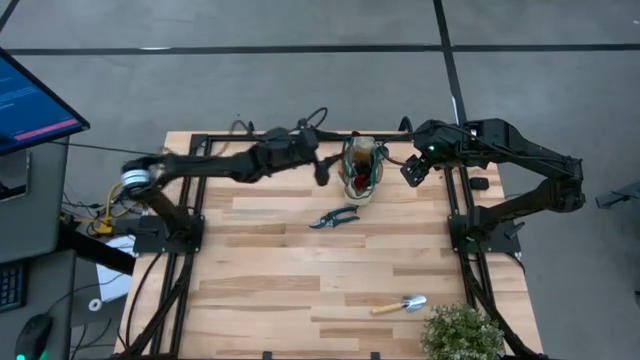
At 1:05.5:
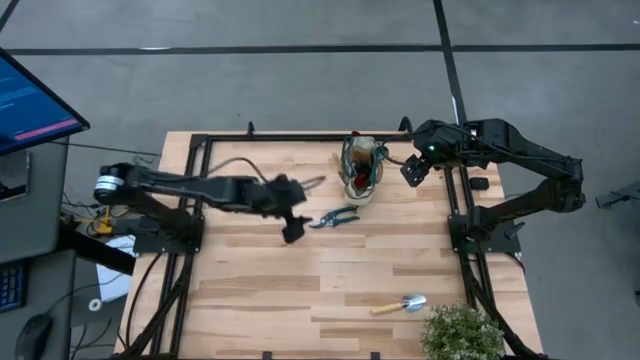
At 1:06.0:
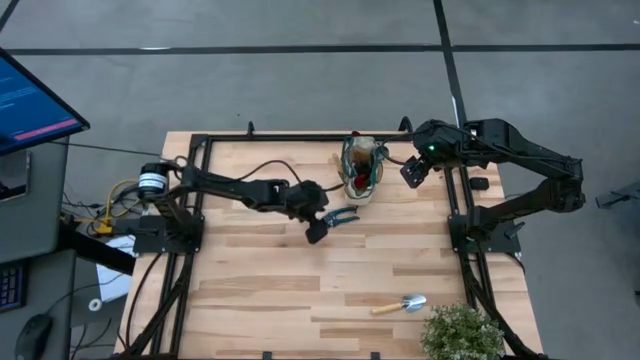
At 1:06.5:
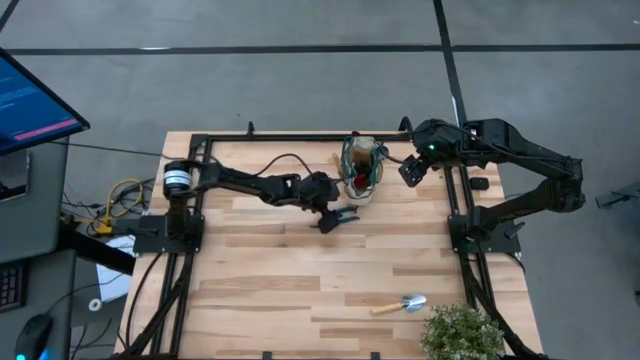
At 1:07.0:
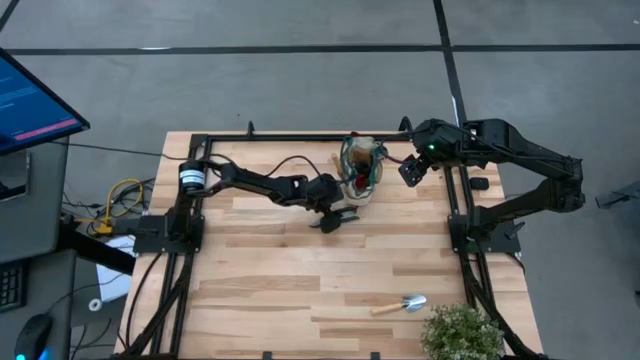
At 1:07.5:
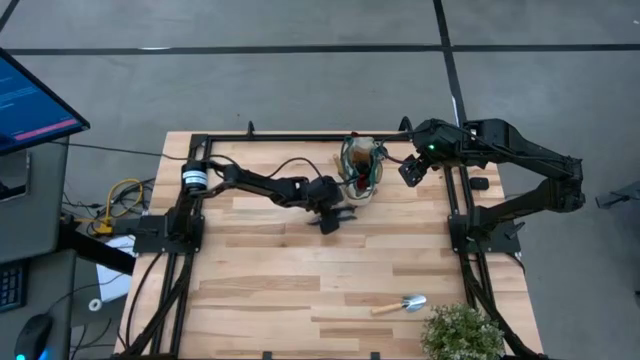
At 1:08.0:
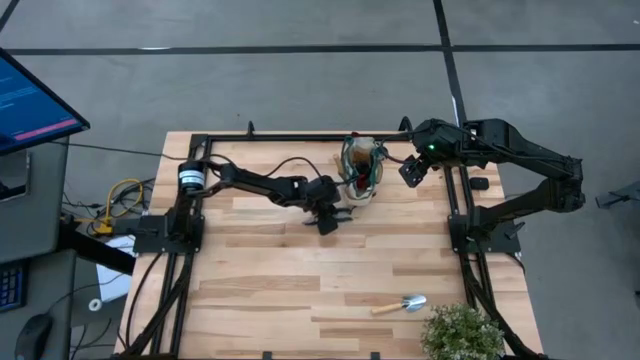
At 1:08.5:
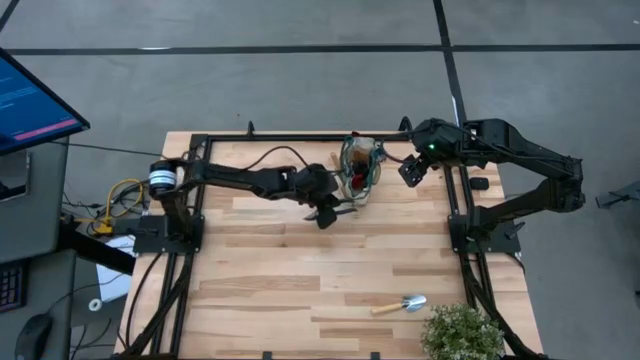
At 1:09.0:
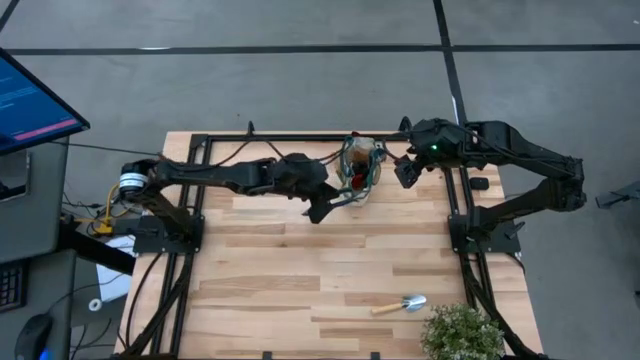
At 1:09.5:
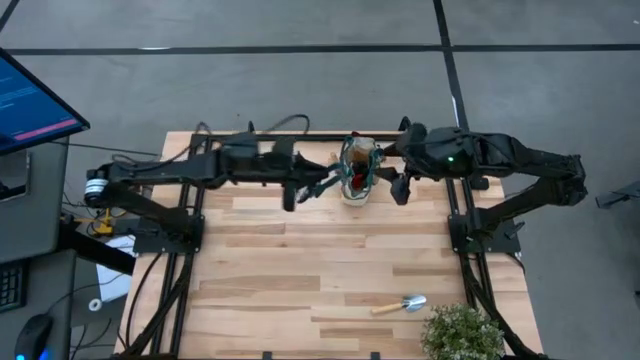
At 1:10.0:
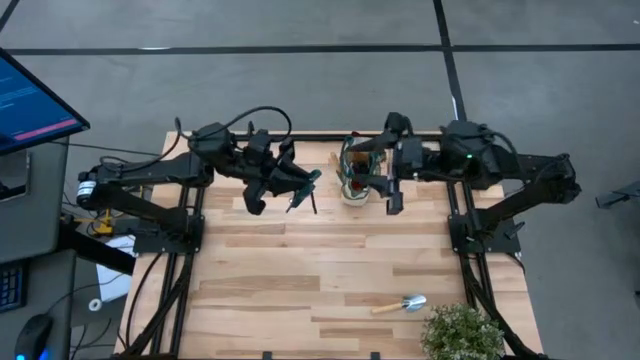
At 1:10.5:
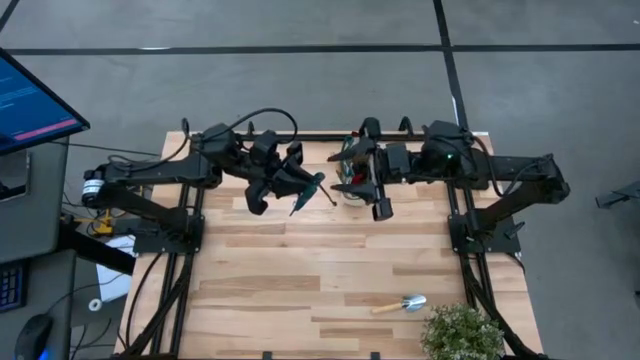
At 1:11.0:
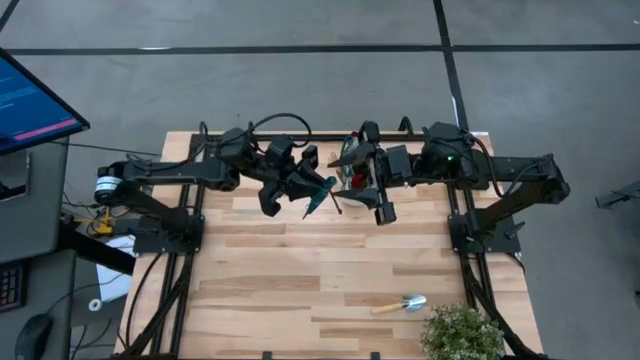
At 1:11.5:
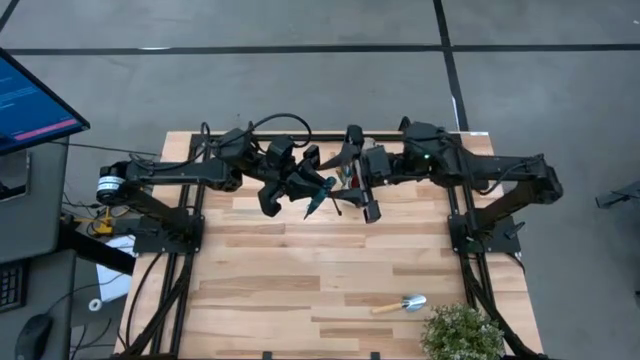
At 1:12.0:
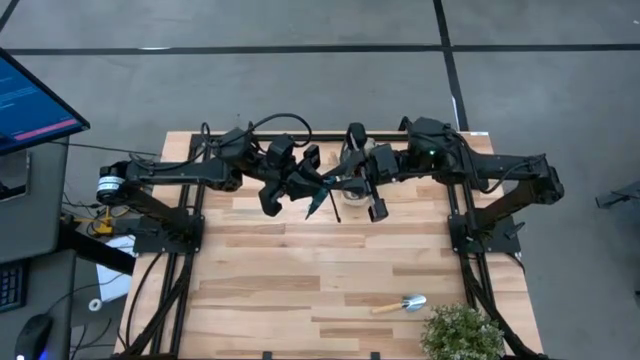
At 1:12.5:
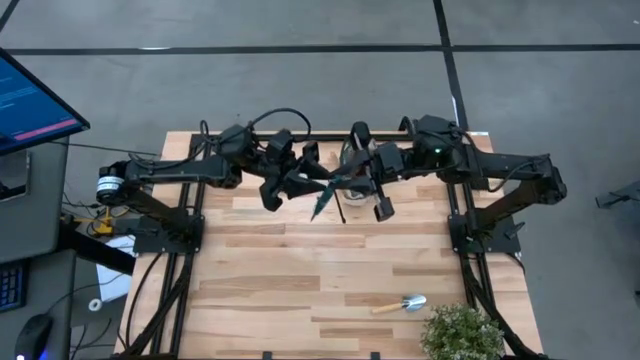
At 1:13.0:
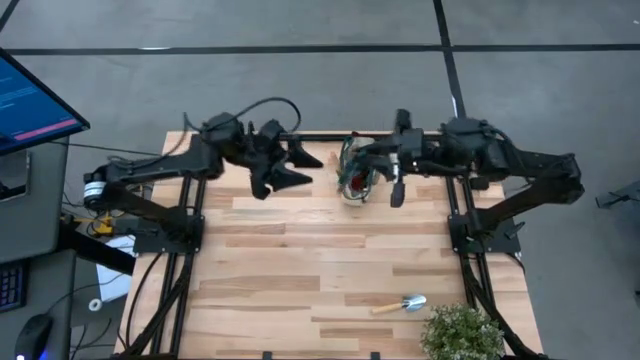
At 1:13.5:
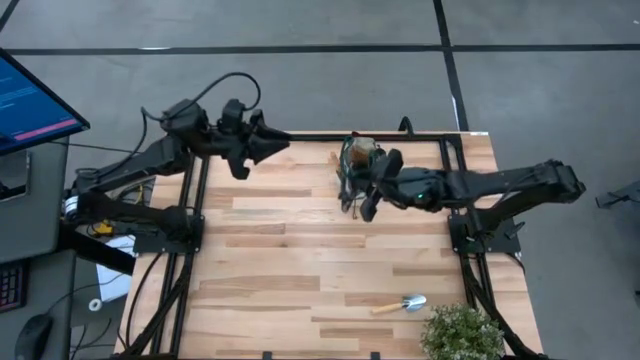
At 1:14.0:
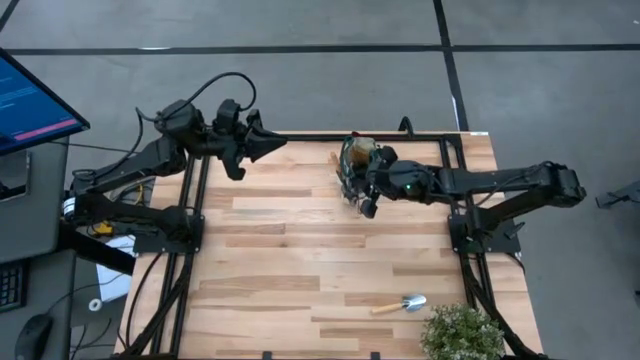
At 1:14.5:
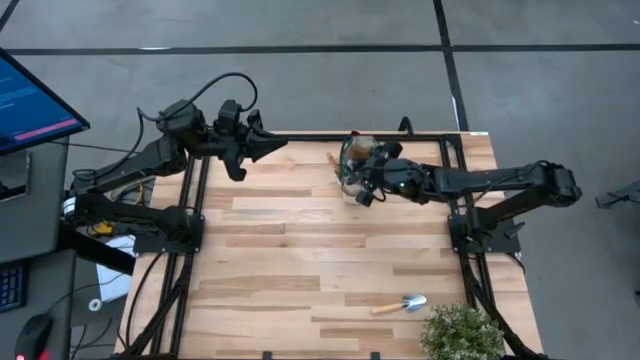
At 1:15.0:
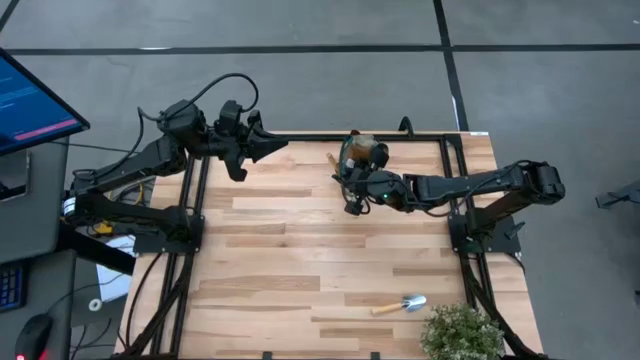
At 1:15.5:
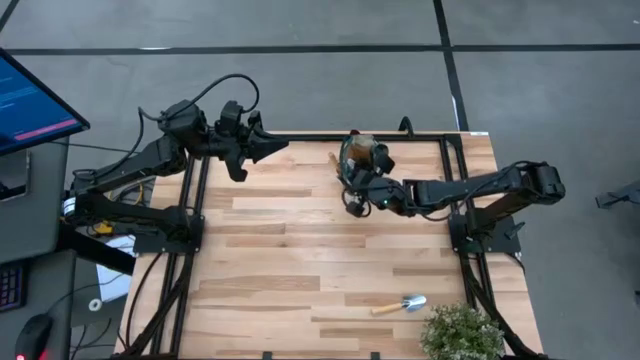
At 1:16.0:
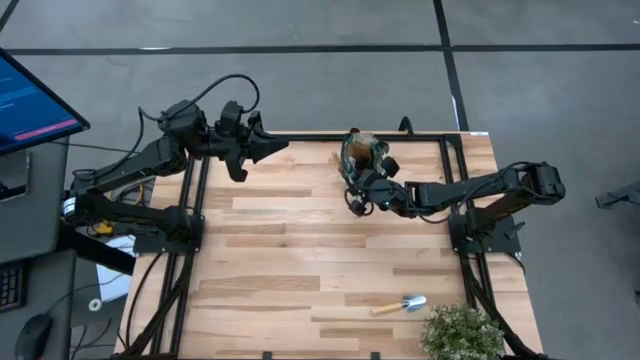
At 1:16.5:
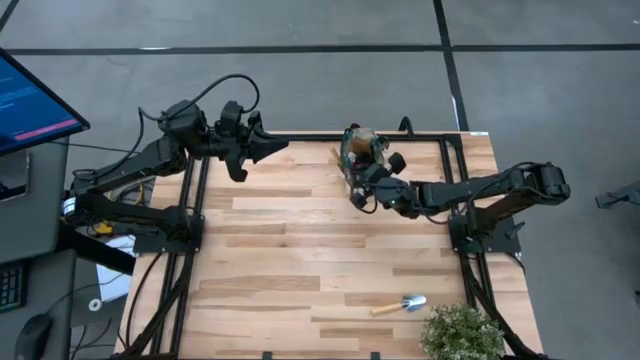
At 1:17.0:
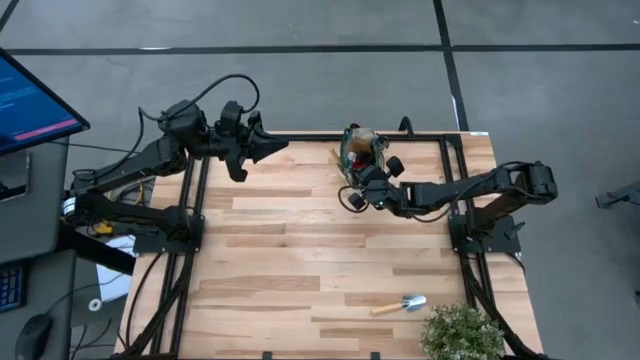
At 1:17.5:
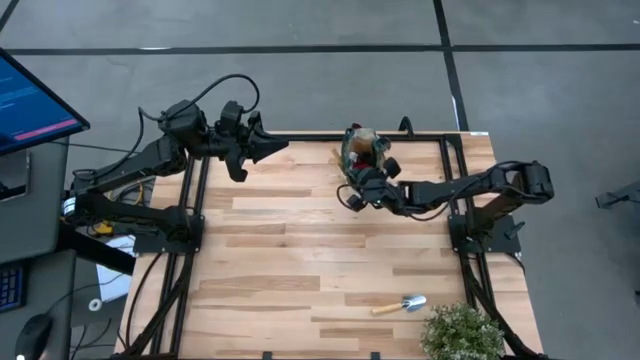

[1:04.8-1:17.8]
Task: Pick & Place Garden tools in Gardening bag
Put the shear scissors into the side pocket of the gardening bag

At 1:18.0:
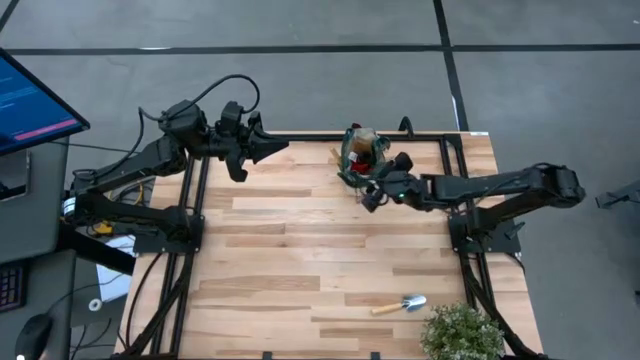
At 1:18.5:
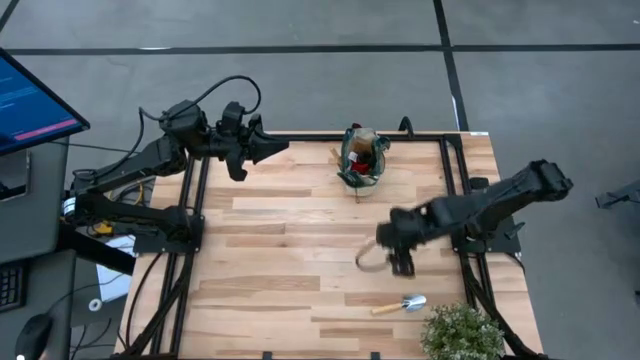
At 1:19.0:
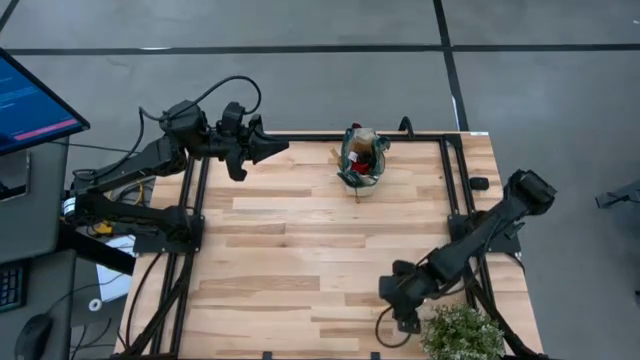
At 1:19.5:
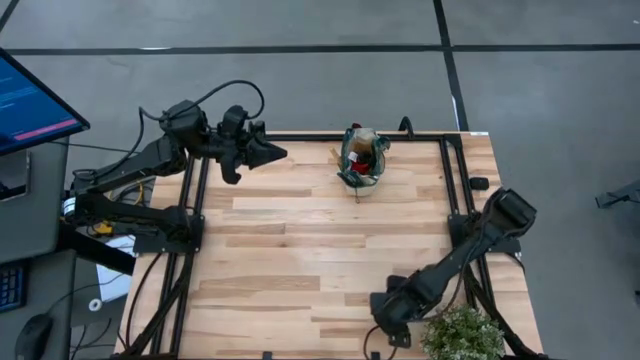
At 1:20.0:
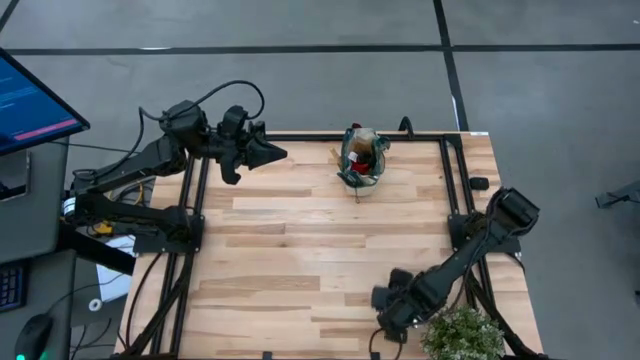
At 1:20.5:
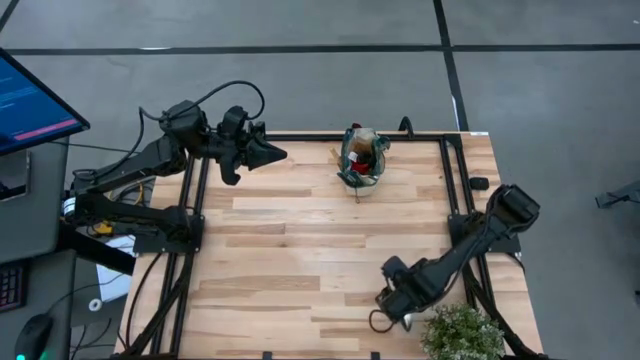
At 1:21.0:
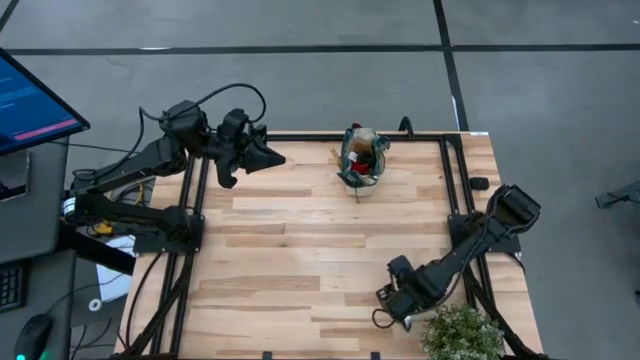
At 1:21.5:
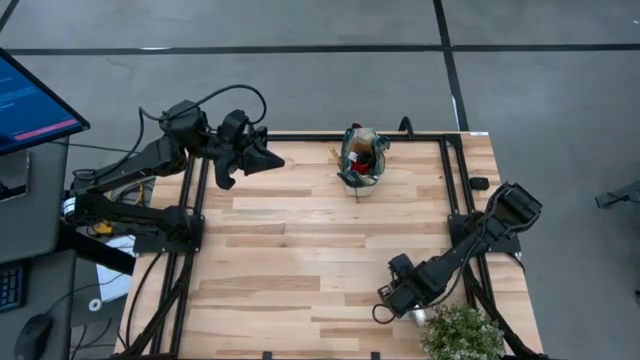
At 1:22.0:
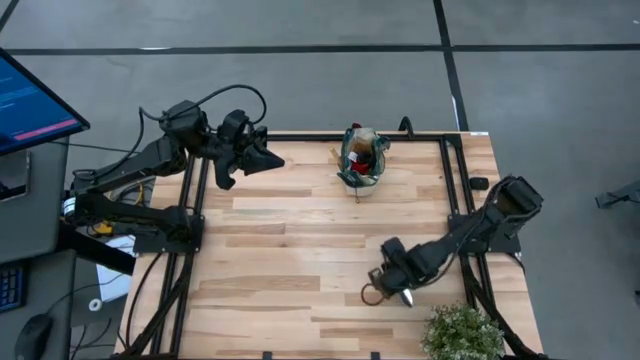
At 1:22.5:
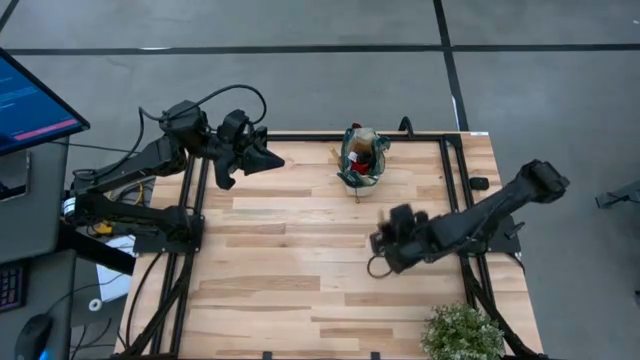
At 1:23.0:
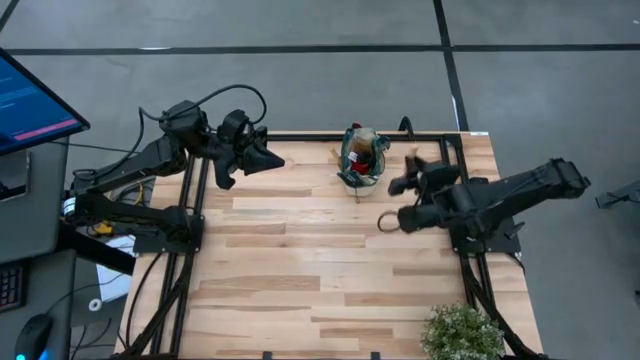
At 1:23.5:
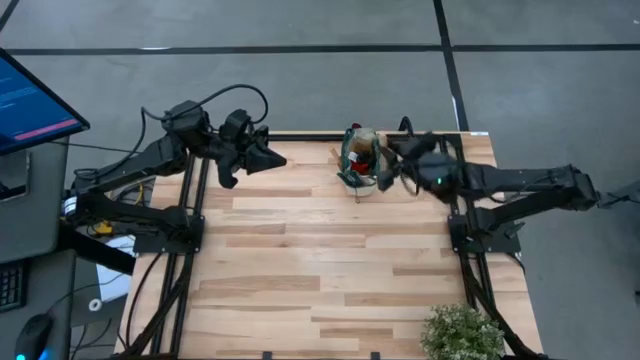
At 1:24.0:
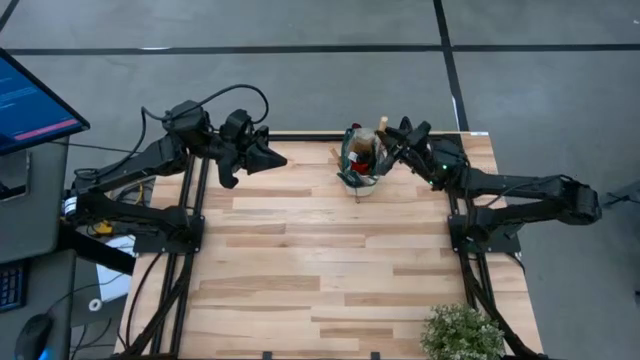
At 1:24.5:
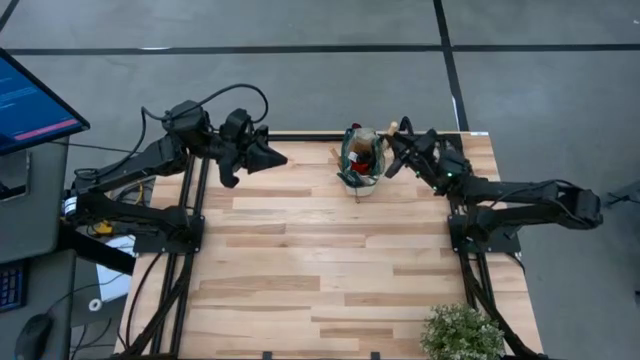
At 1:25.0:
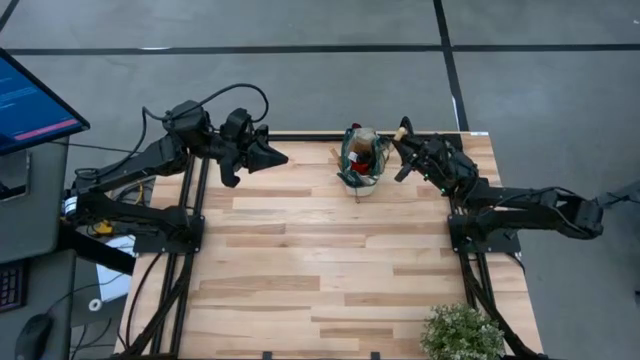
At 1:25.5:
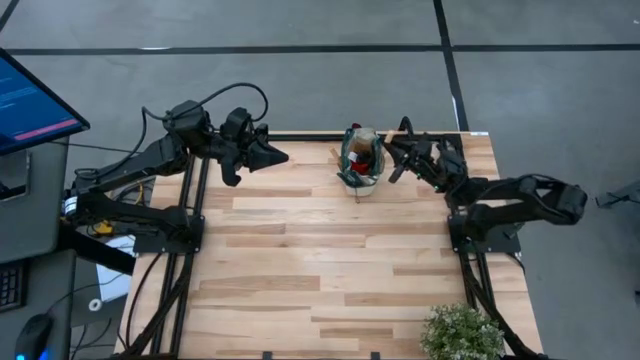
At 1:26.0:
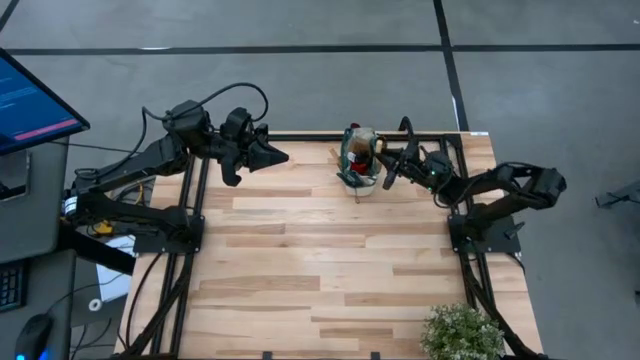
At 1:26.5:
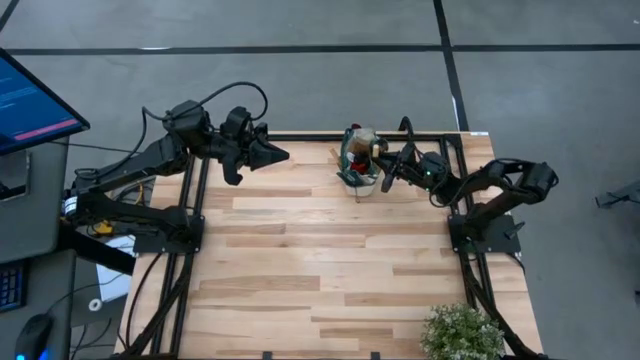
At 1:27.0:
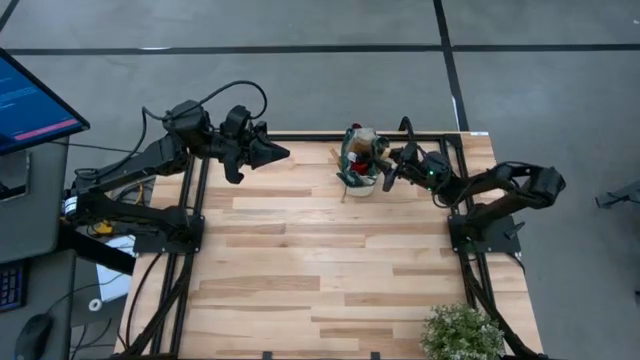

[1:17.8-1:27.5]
Put the trowel into the side pocket of the gardening bag
